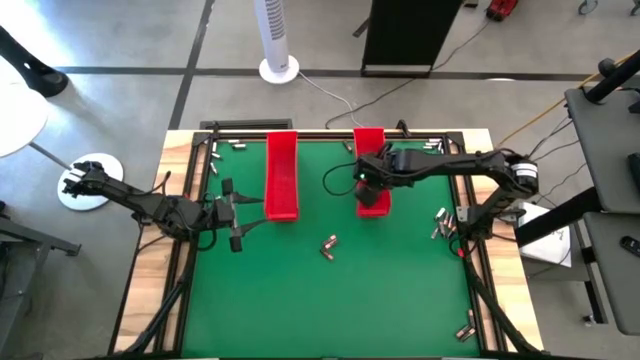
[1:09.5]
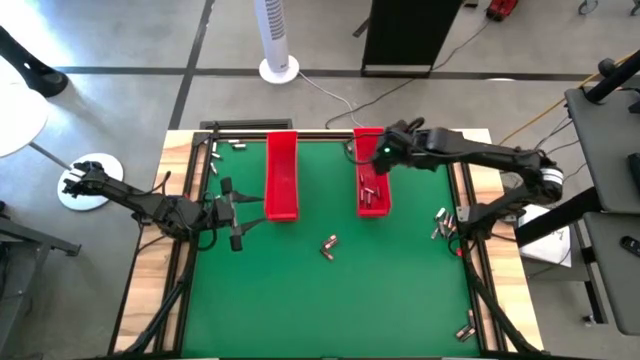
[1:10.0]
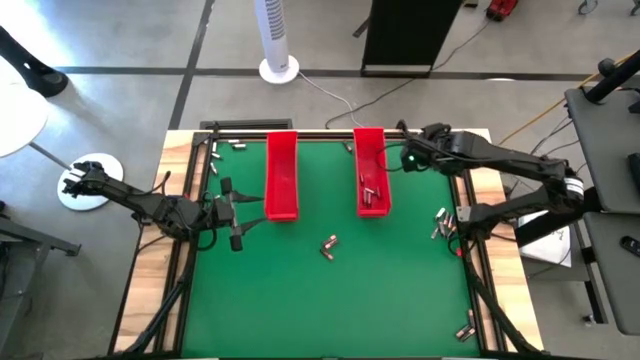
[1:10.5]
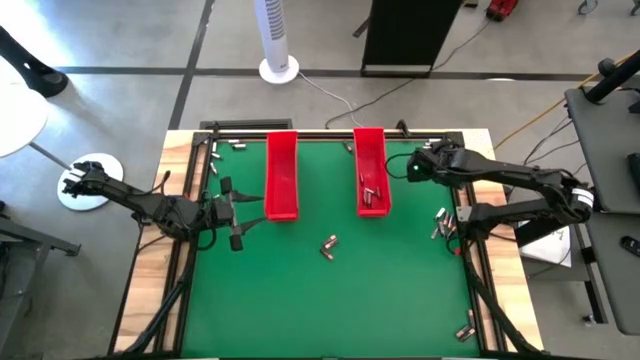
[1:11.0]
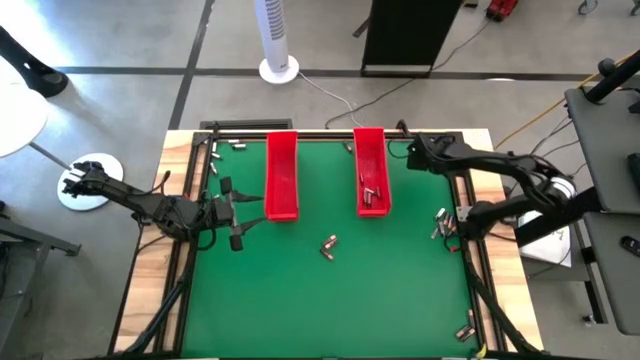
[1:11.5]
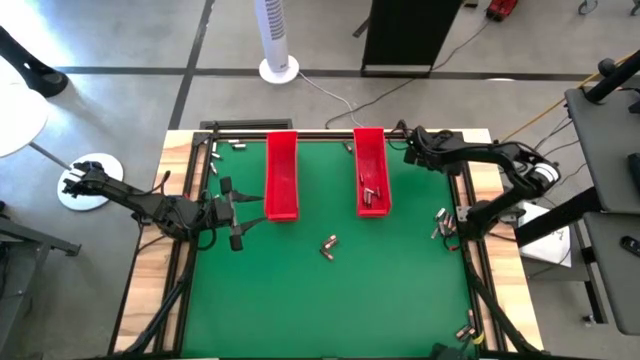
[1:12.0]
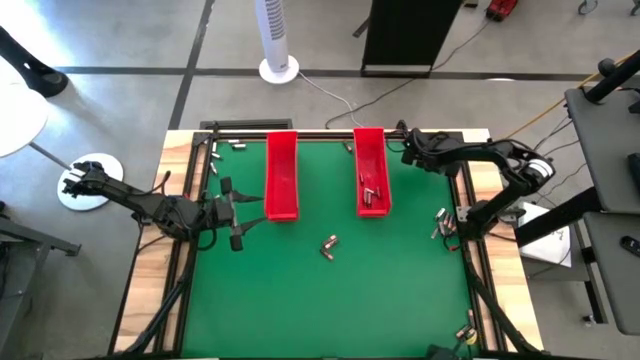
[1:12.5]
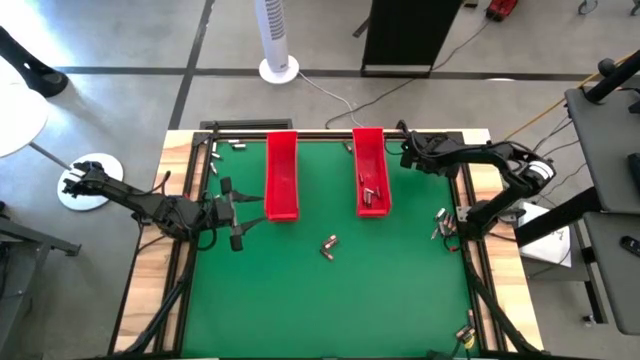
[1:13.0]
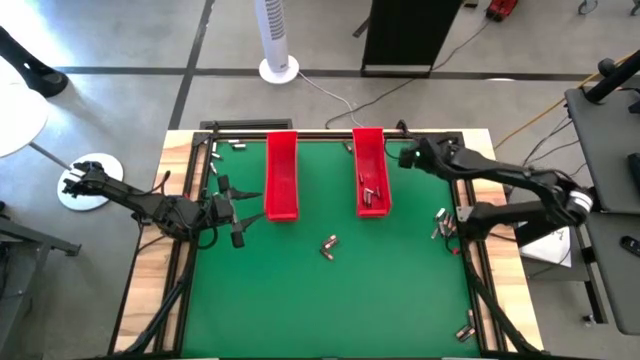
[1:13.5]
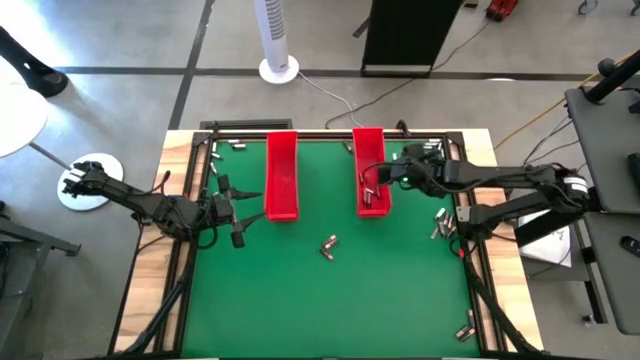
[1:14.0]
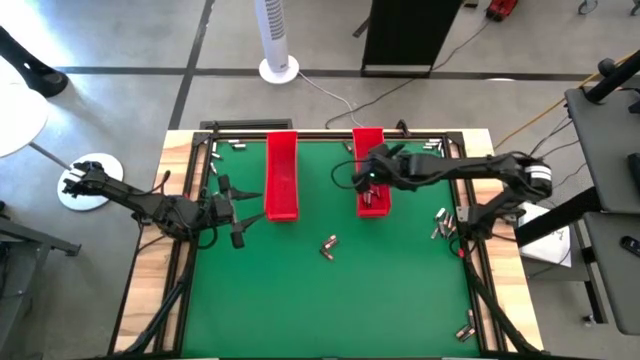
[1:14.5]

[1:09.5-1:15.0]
Task: Sort batteries
Put the silver battery into the right red bin

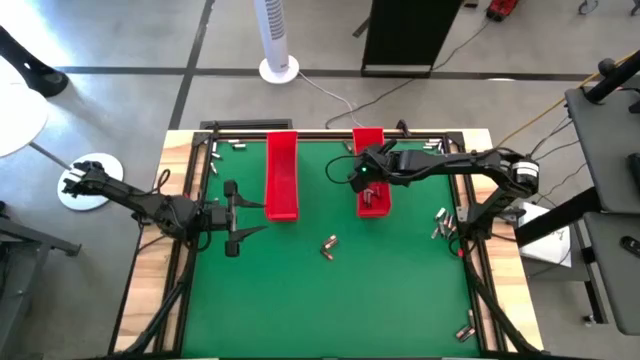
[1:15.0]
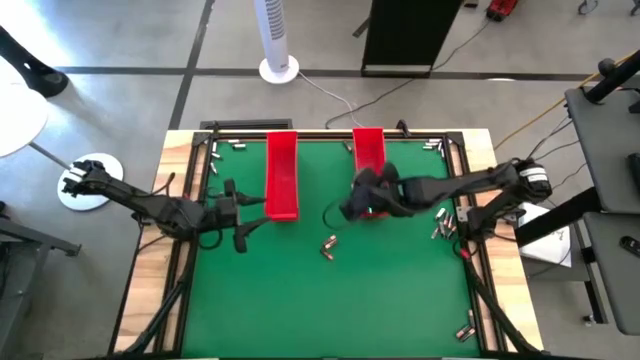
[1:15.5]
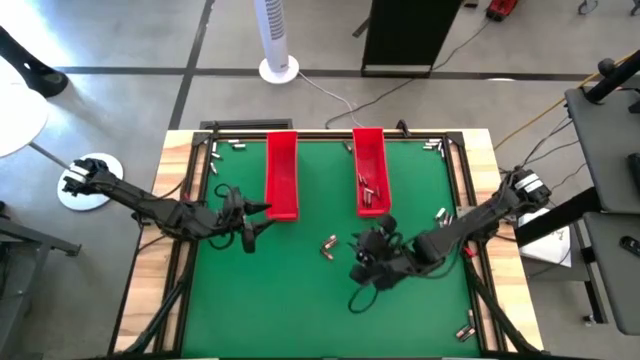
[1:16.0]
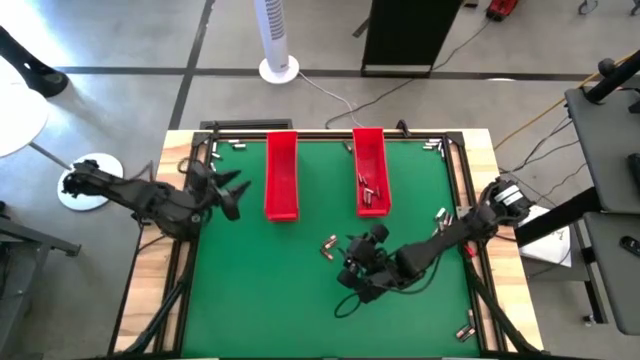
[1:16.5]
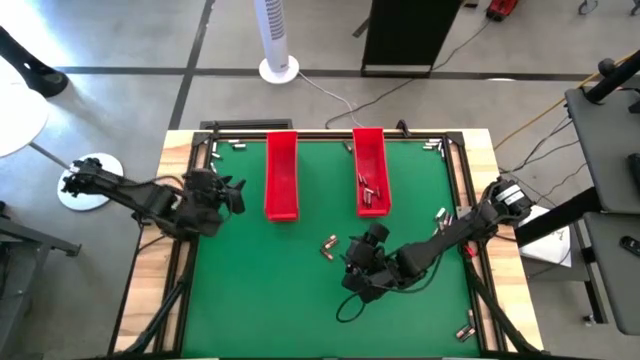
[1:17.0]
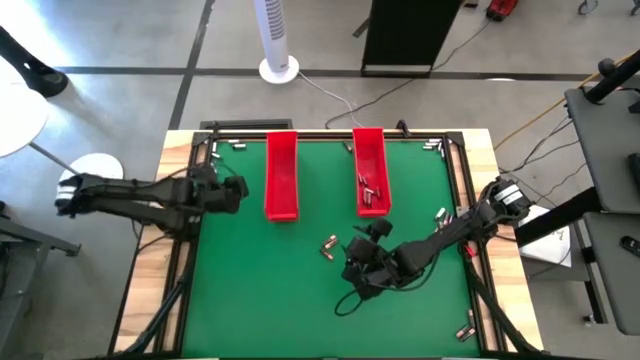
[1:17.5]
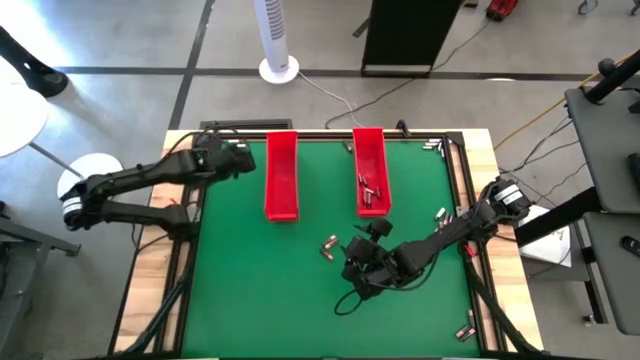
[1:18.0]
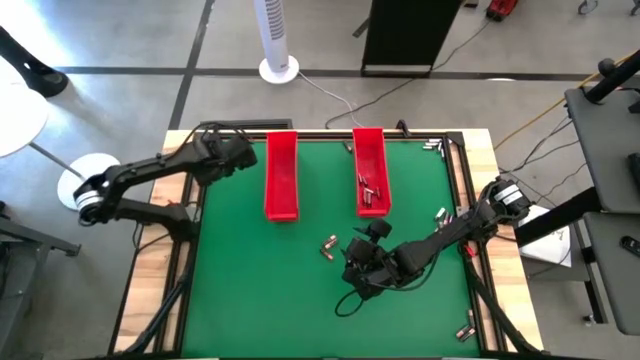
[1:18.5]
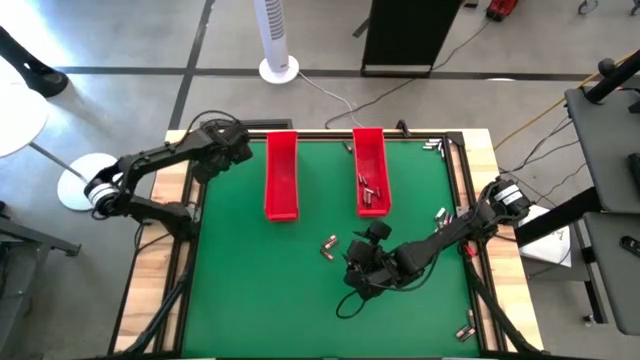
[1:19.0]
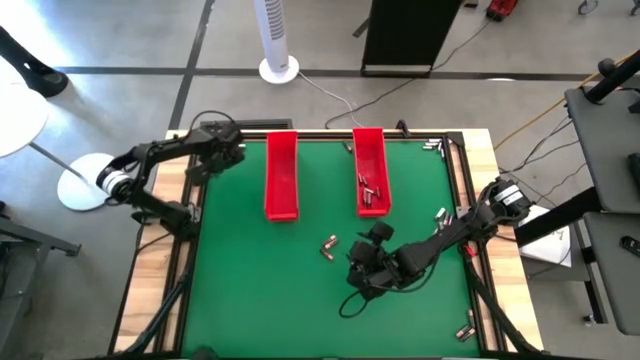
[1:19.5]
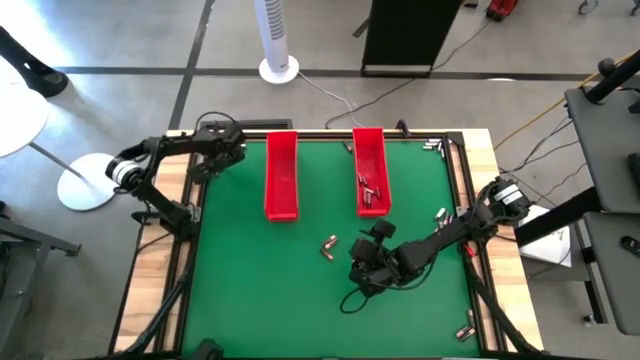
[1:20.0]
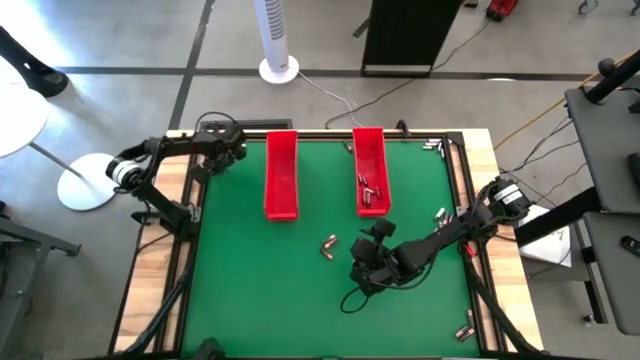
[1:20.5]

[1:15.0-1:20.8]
Put the silver battery into the right red bin

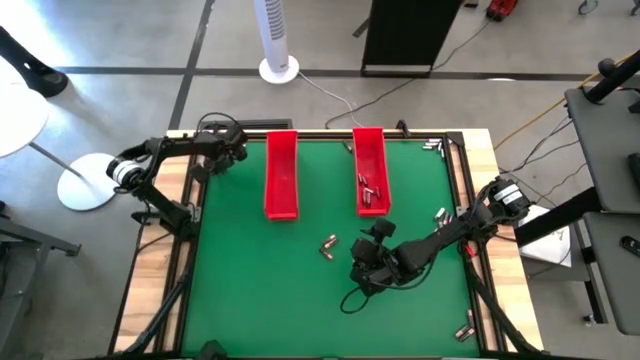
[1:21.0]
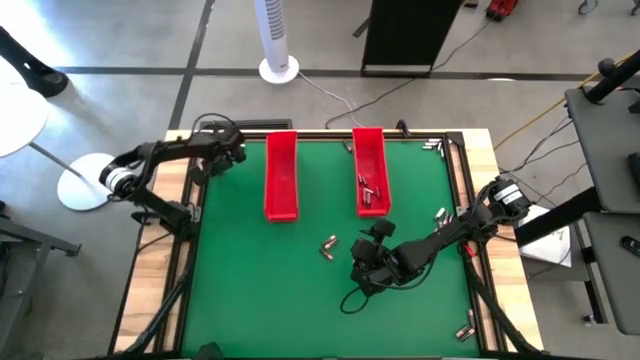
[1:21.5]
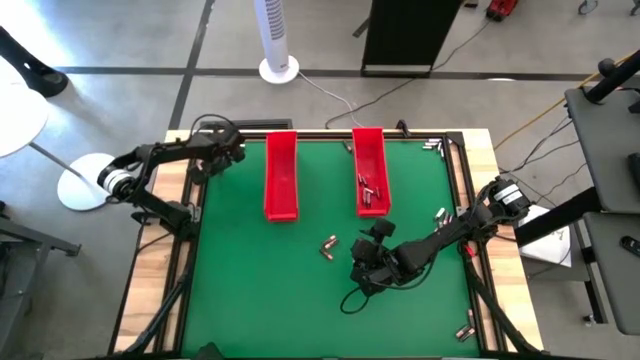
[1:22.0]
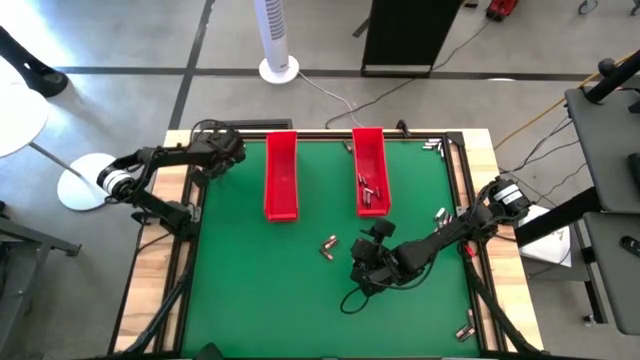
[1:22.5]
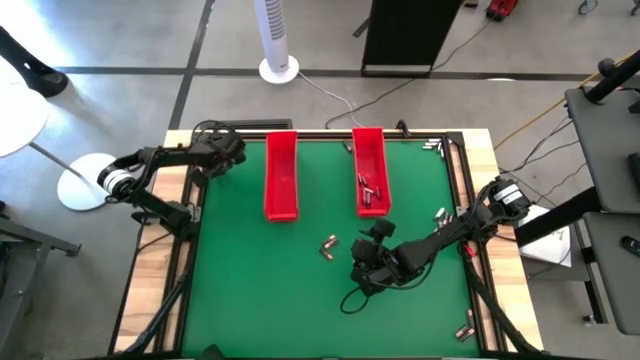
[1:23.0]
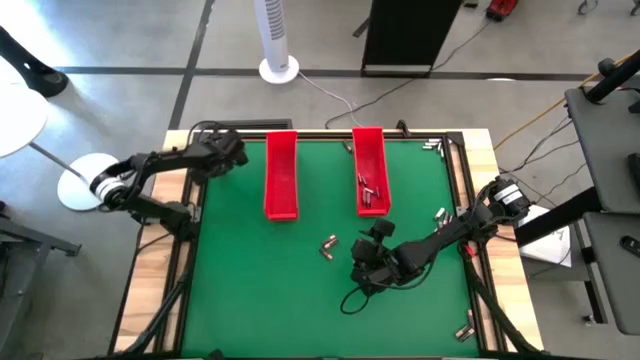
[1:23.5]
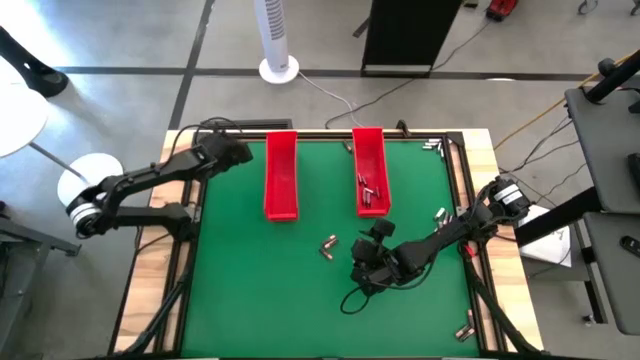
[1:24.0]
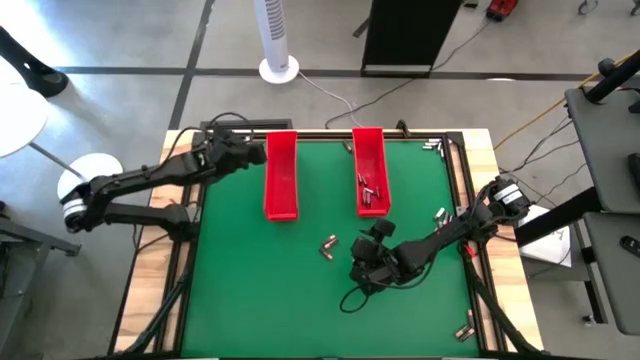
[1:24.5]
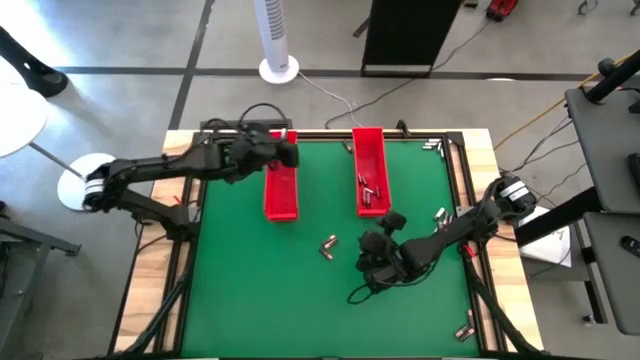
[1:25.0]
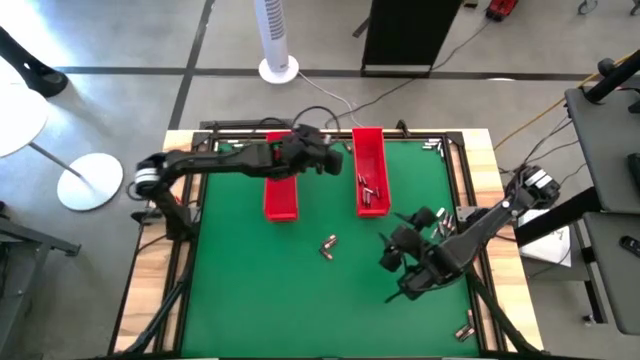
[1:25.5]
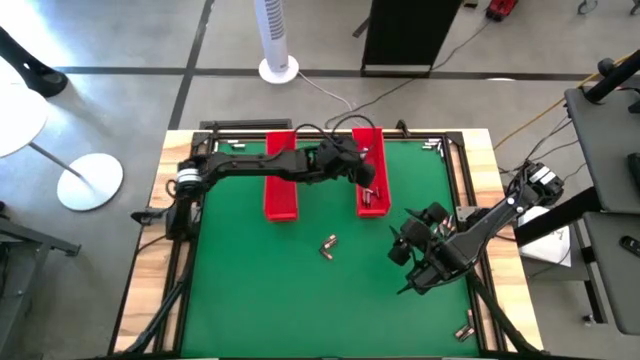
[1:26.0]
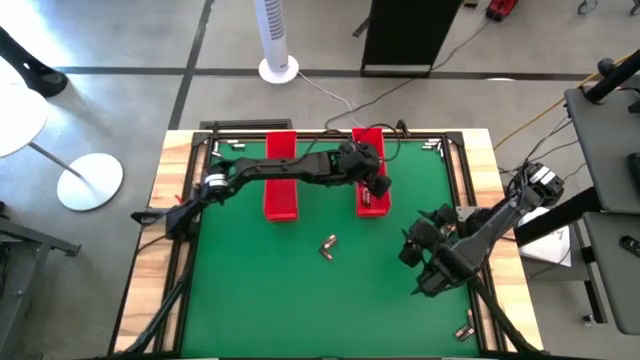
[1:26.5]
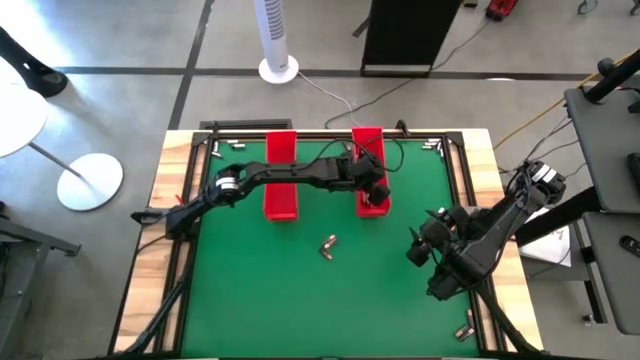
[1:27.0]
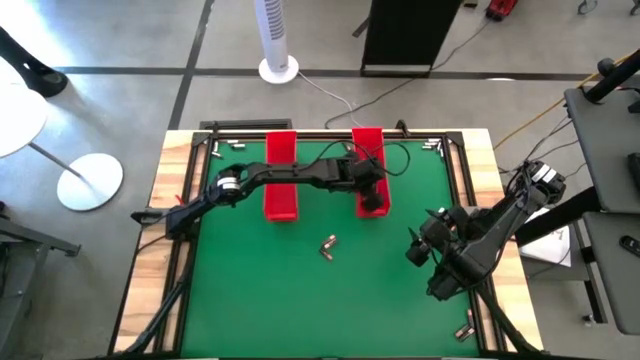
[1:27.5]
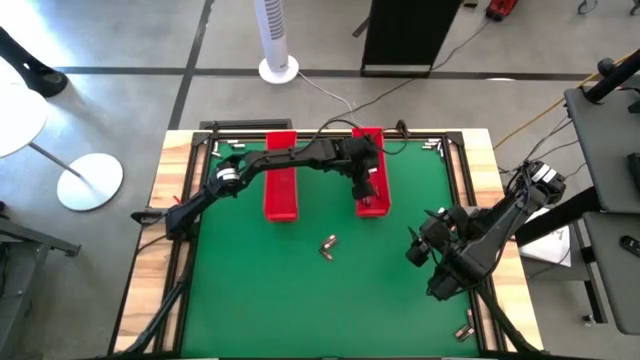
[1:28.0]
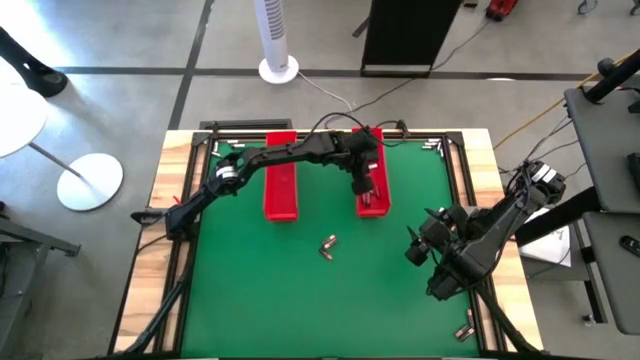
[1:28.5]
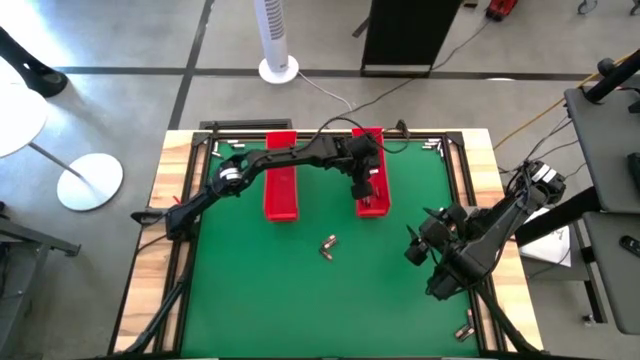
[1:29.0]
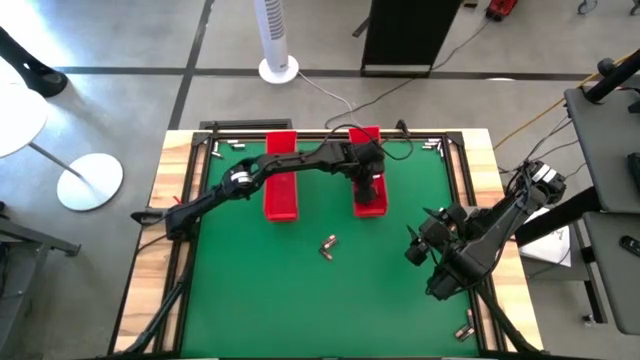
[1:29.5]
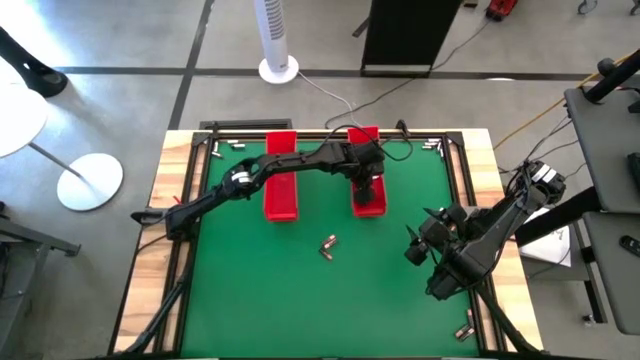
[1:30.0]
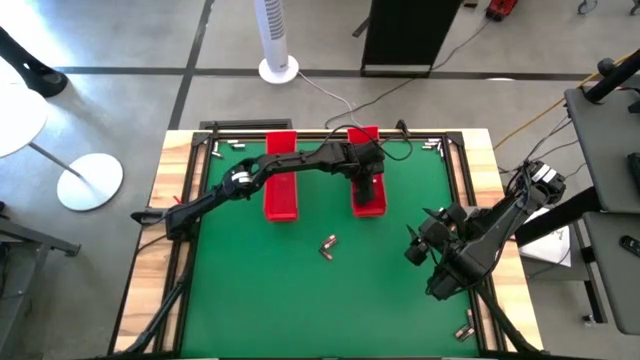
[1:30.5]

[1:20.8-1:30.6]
Put the silver battery into the right red bin
